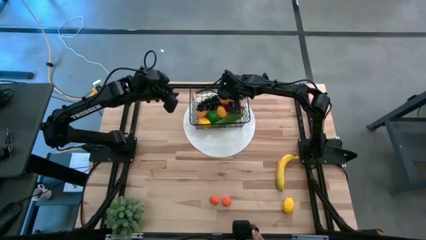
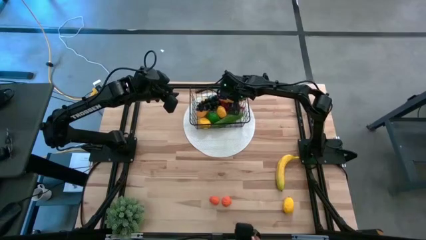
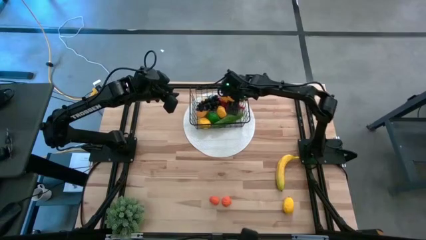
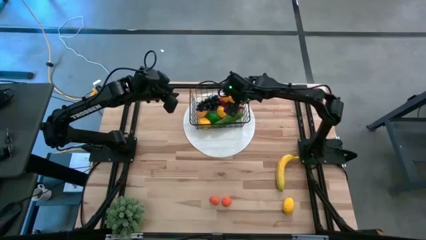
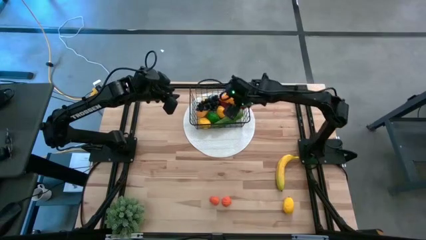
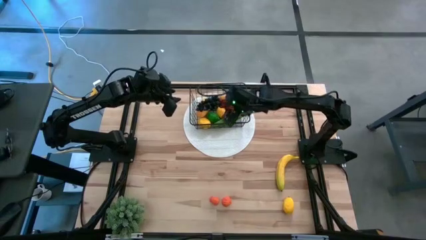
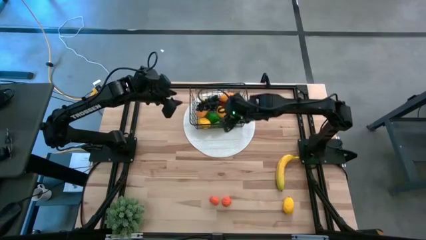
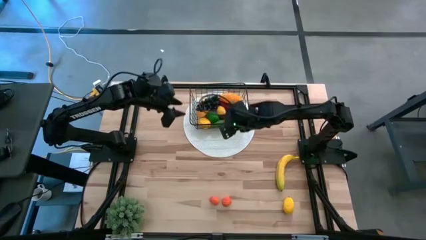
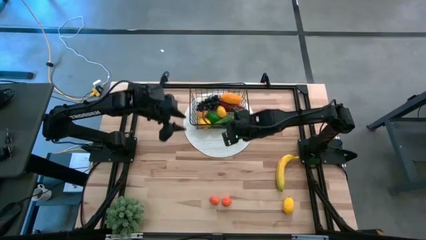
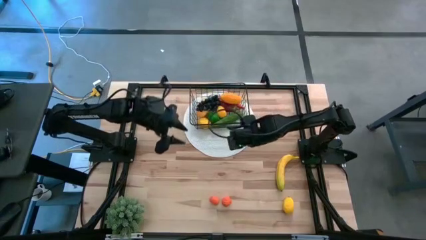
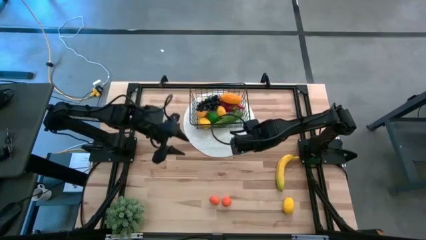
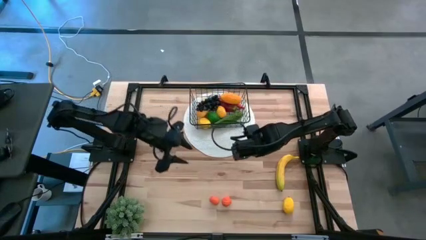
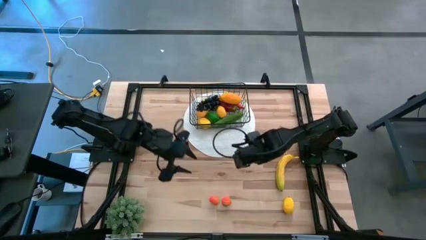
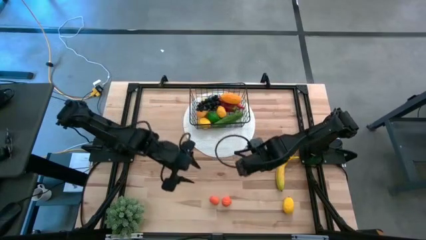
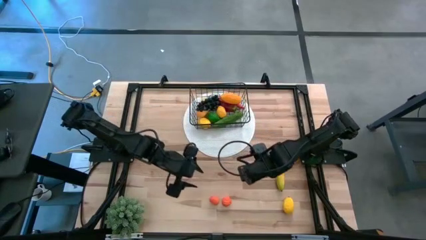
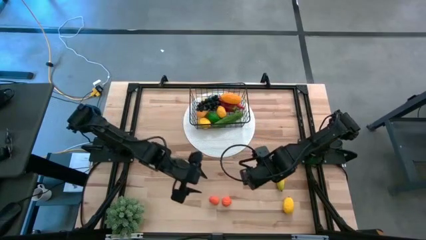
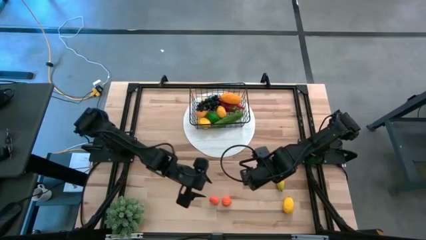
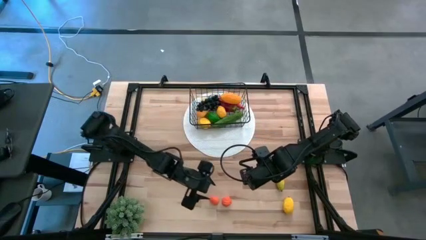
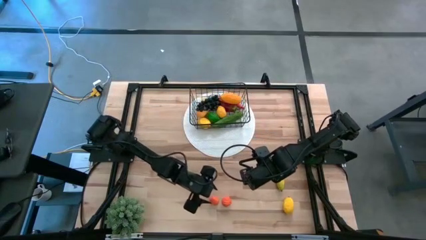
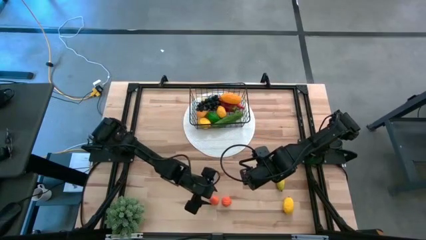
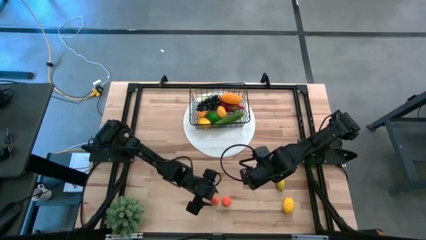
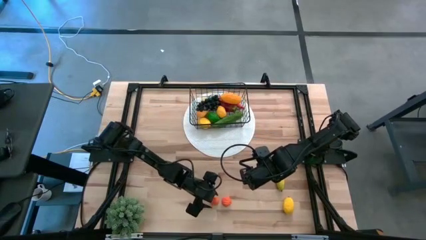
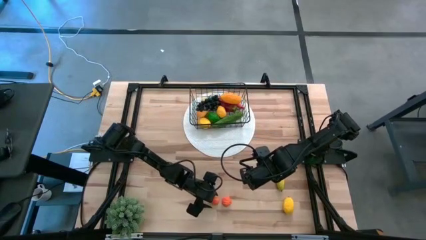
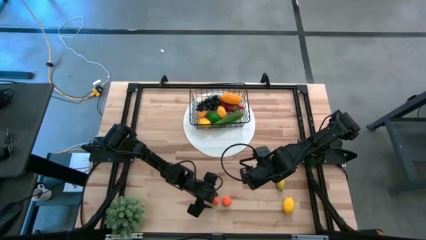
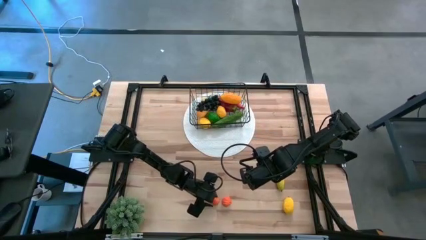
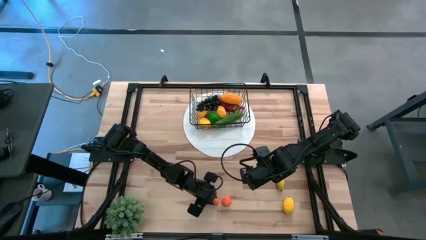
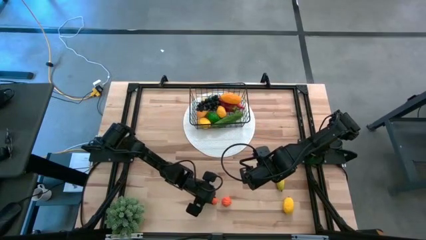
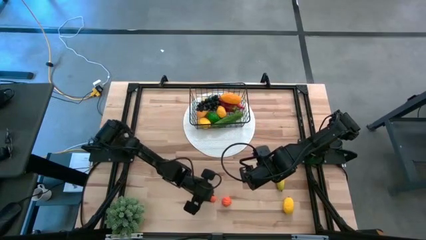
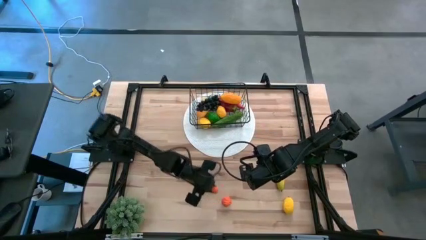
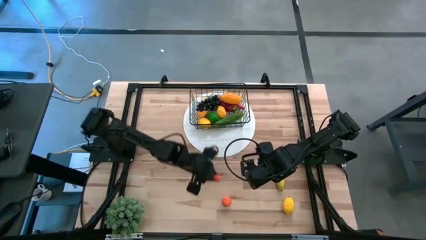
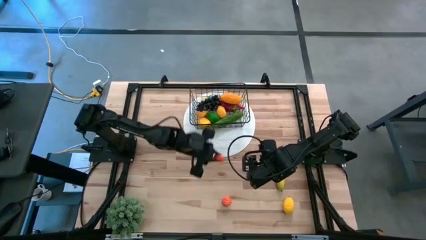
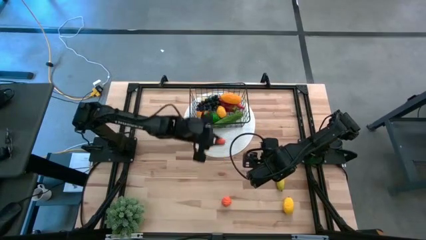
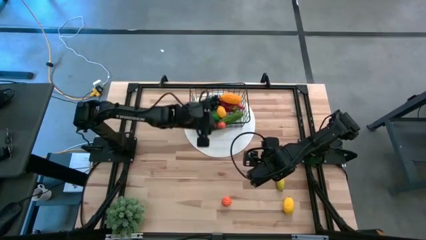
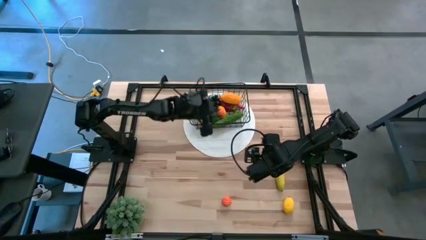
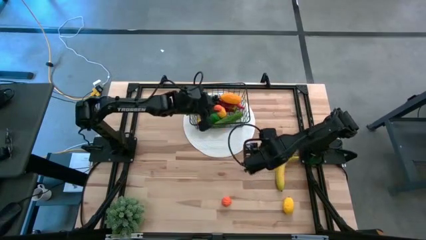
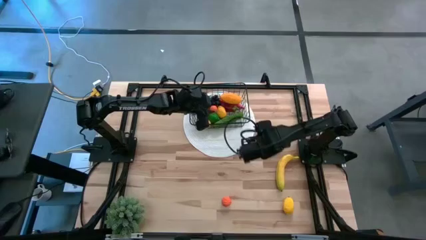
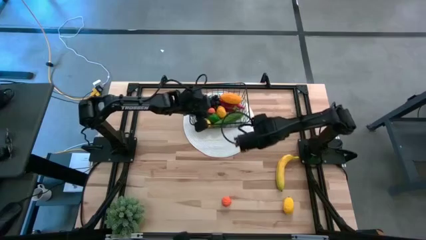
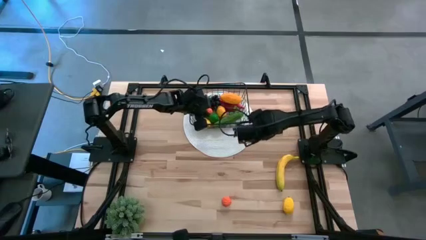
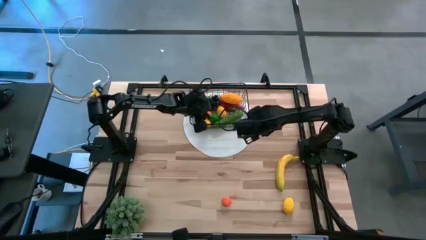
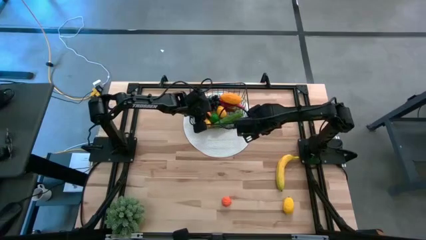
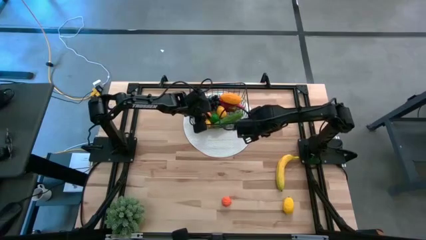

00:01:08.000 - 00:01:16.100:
Task: Build produce basket
Put the left orange fruit into the black basket

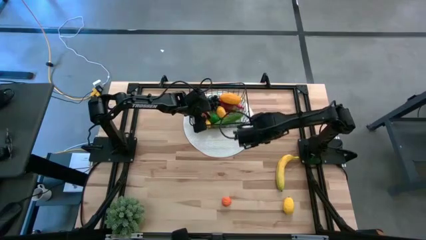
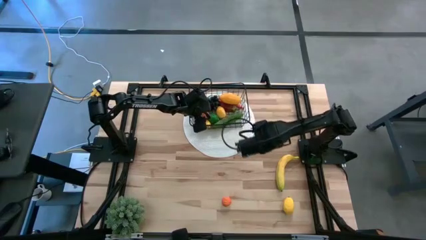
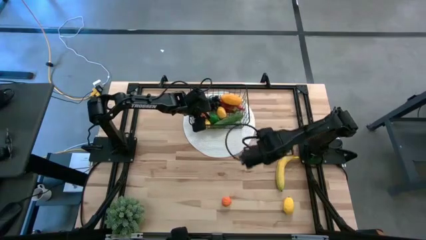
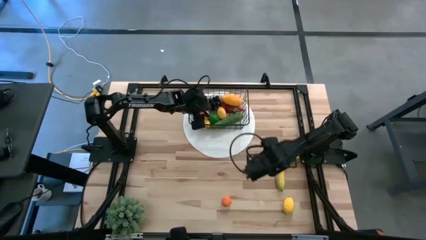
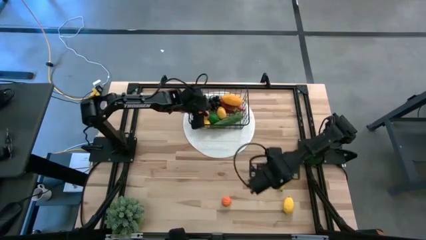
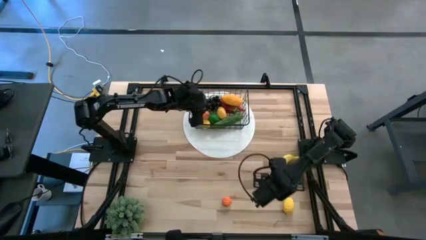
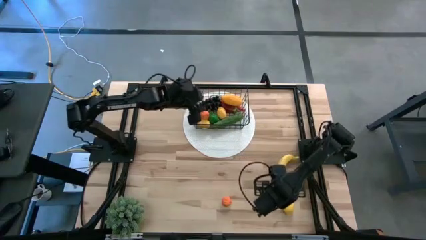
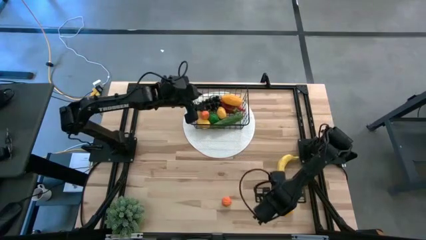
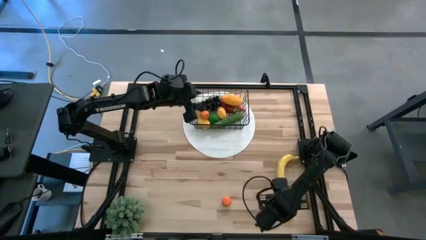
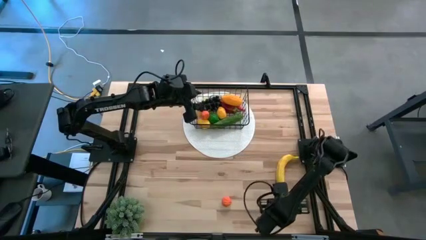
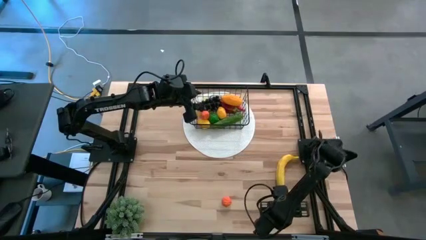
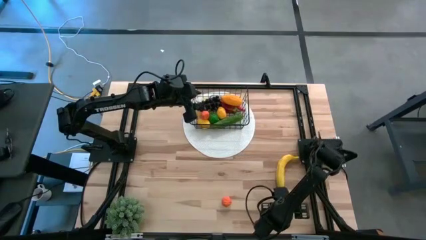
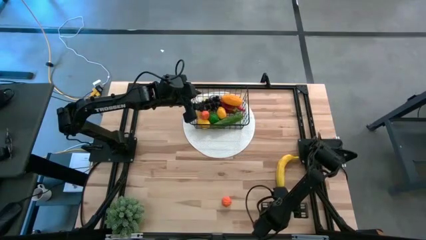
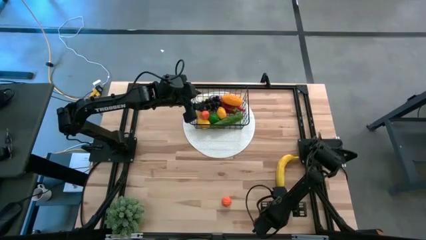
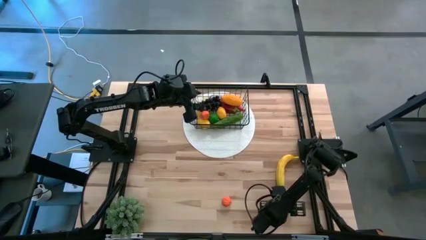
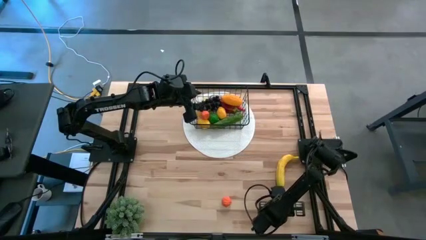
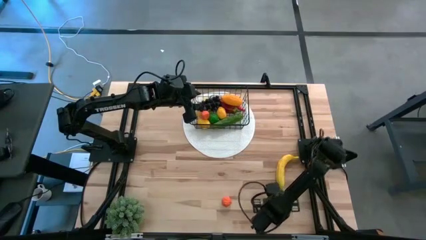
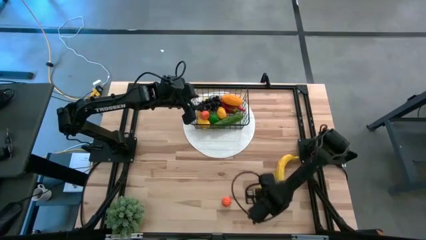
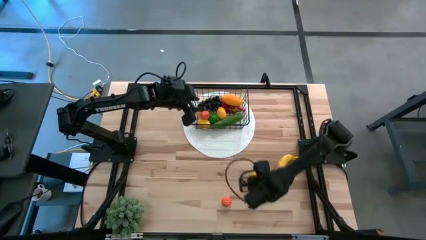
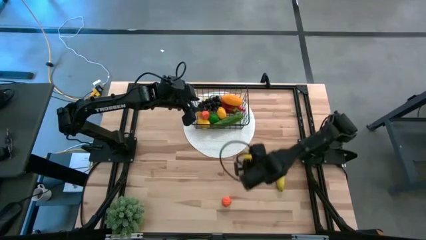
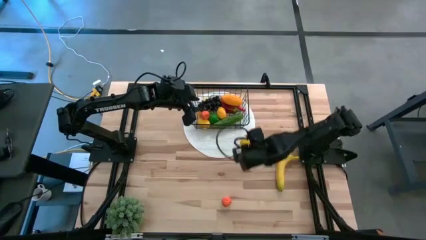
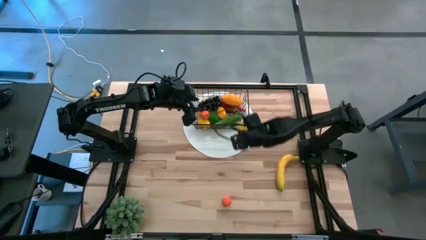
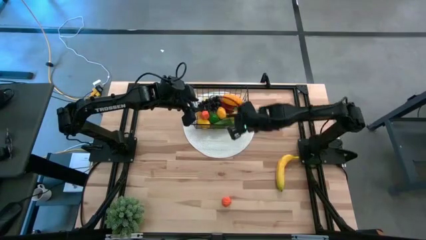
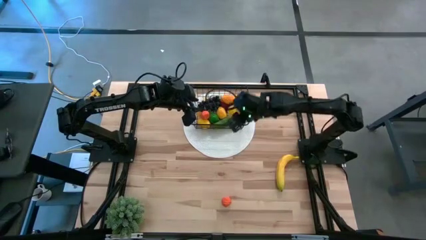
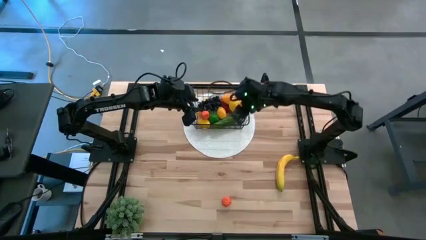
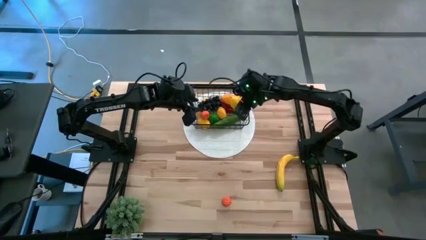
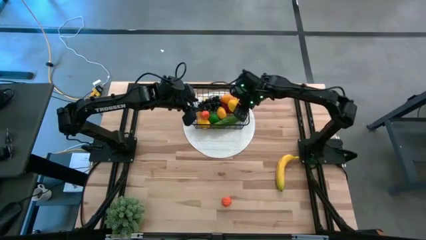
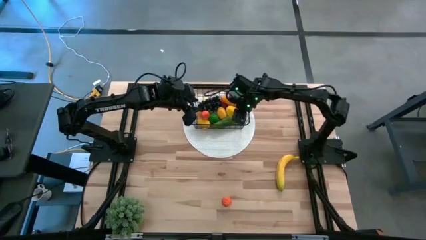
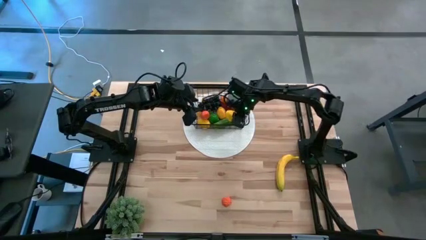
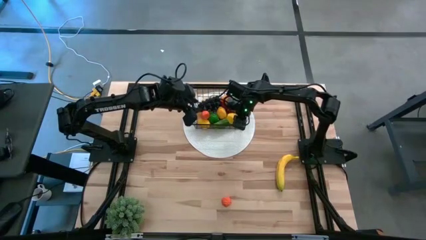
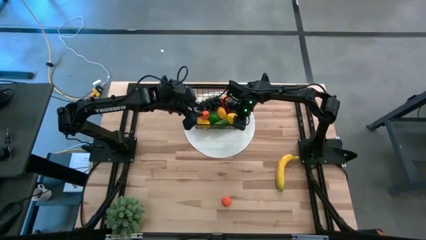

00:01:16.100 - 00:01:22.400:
Put the yellow lemon into the black basket

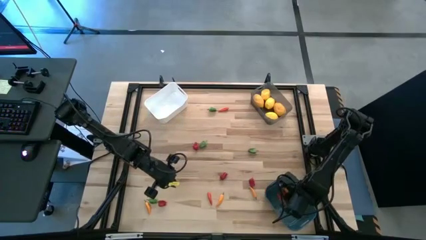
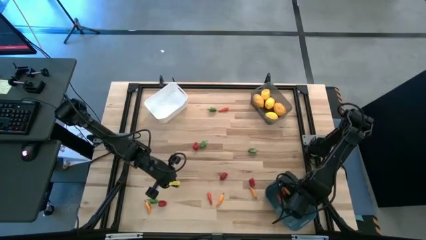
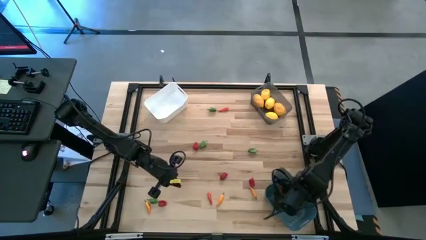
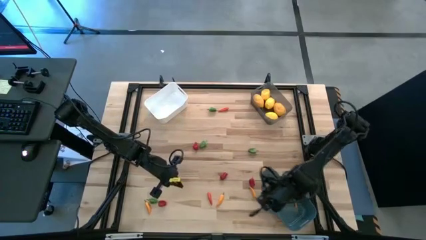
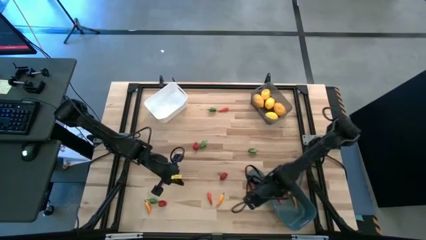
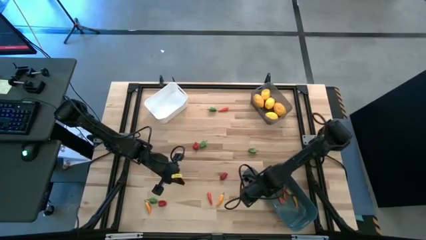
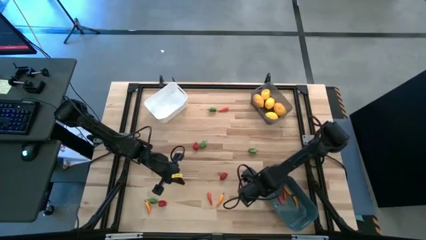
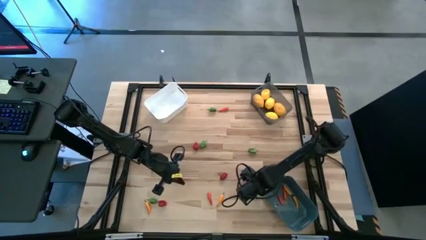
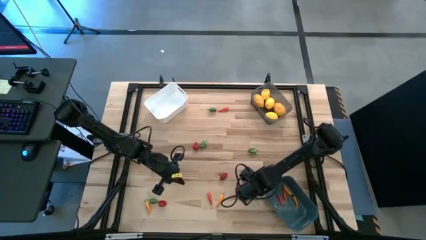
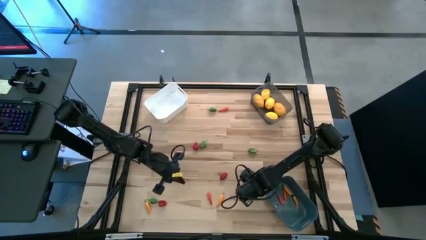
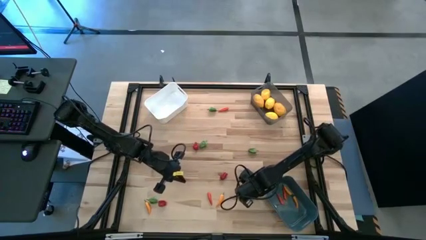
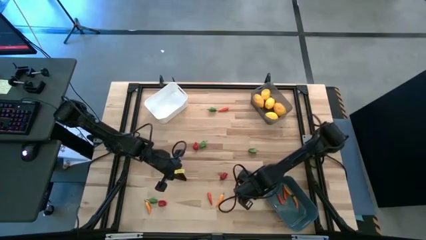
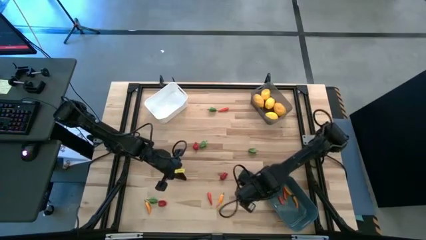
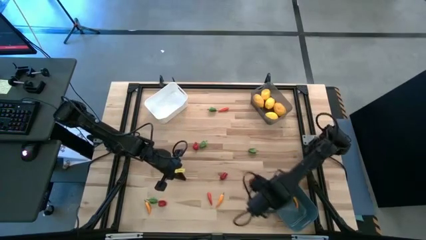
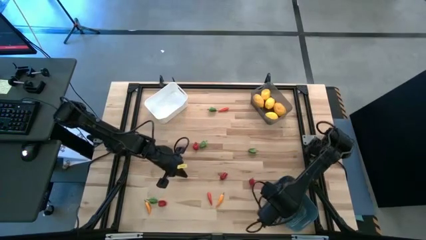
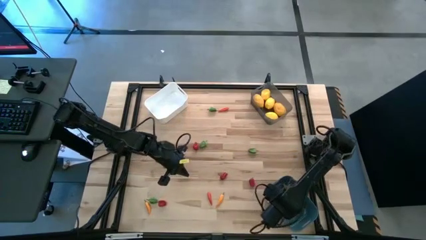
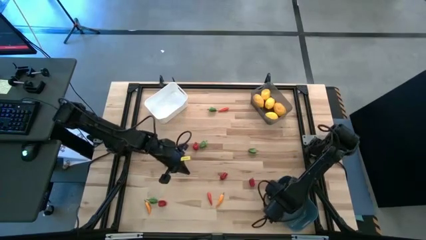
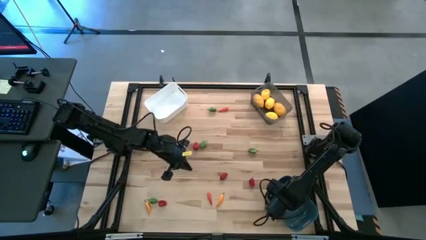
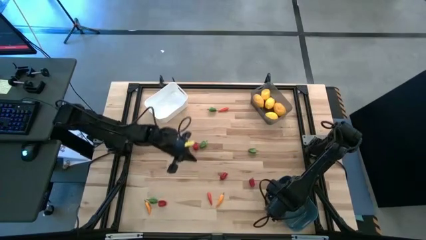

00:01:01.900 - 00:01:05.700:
Task: Sort produce into baskets
Put the yellow chili pepper into the blue bin
